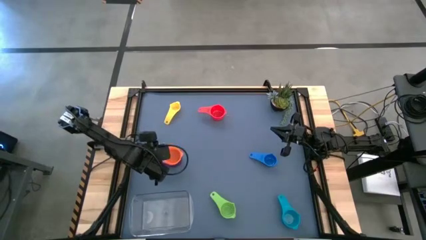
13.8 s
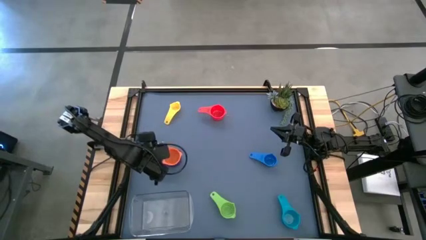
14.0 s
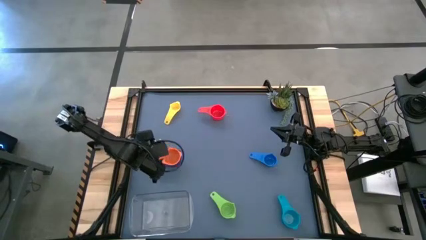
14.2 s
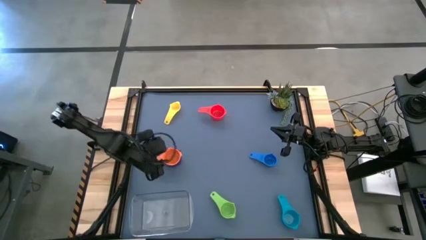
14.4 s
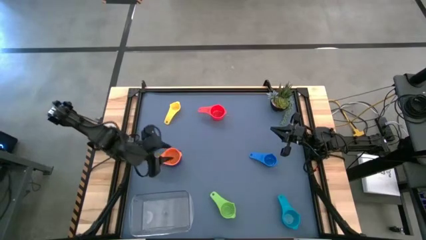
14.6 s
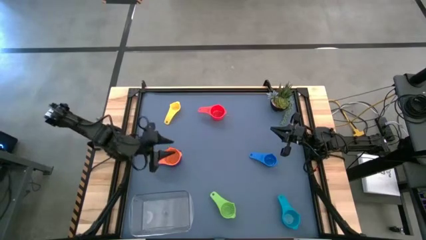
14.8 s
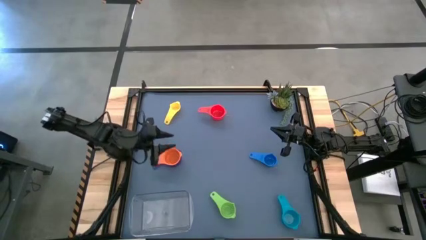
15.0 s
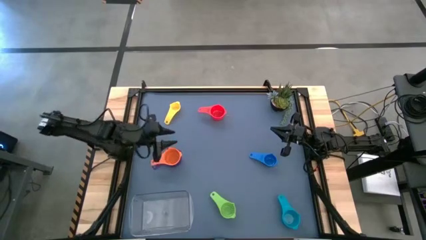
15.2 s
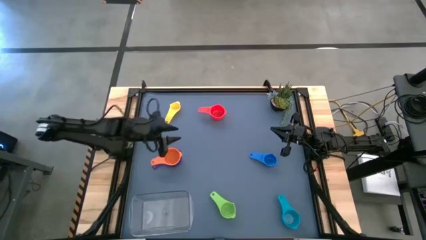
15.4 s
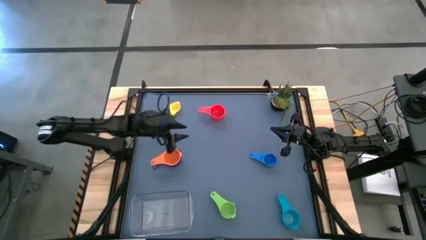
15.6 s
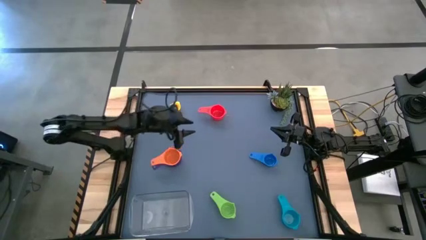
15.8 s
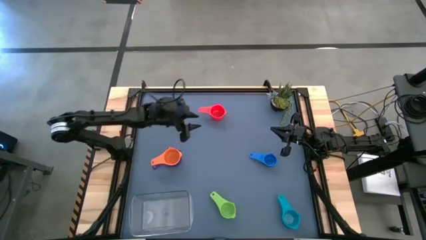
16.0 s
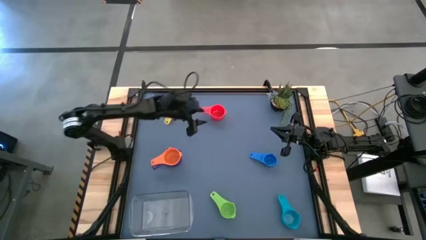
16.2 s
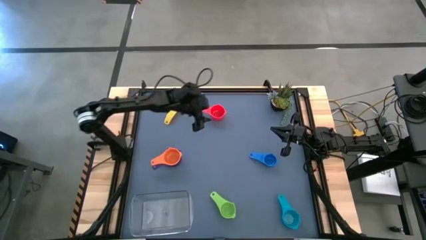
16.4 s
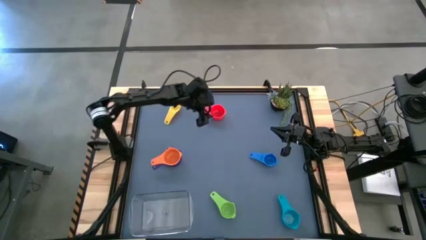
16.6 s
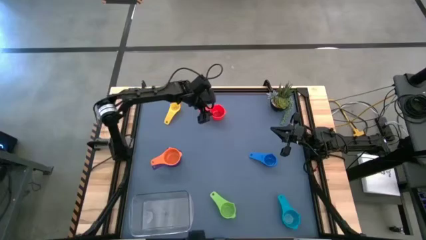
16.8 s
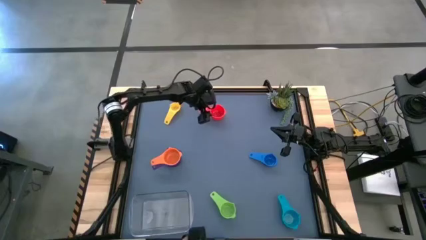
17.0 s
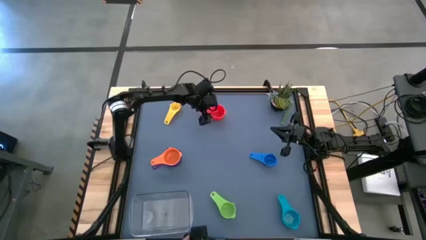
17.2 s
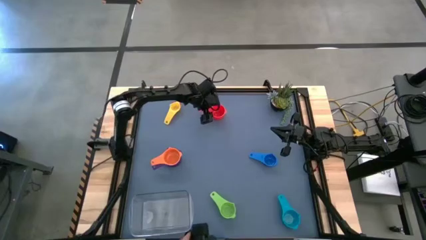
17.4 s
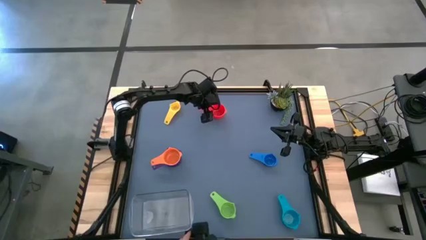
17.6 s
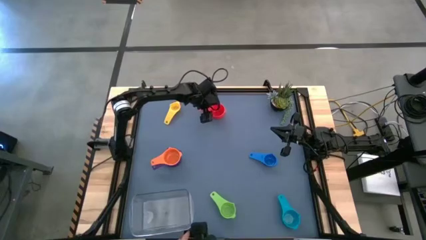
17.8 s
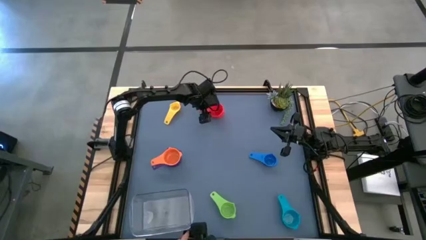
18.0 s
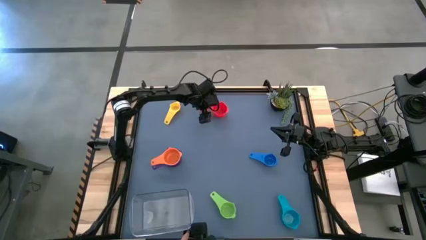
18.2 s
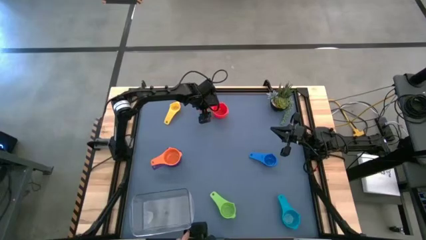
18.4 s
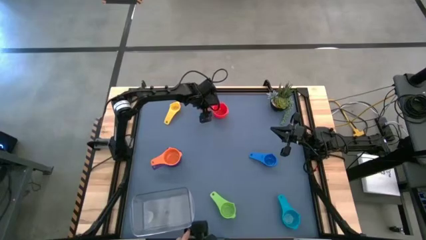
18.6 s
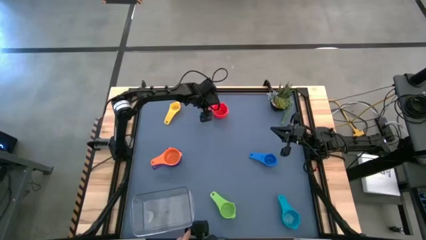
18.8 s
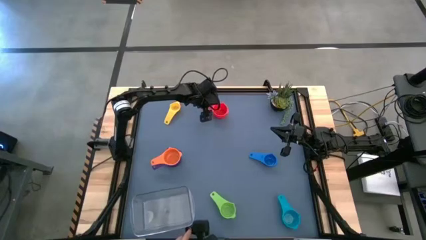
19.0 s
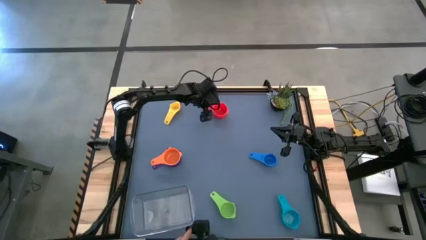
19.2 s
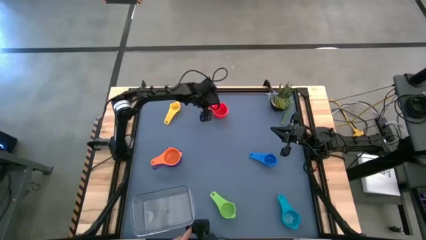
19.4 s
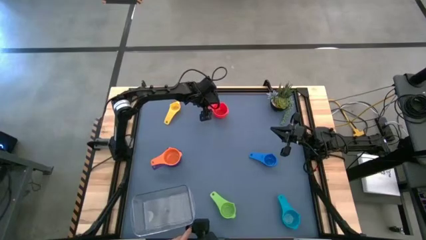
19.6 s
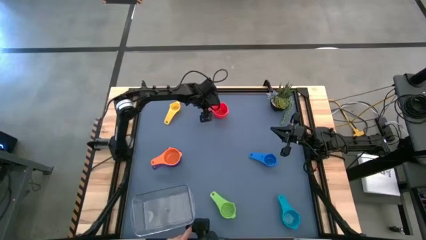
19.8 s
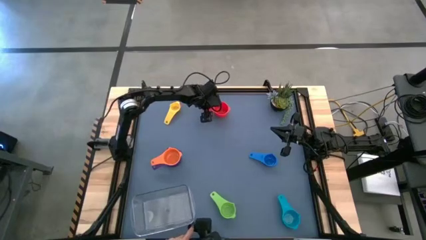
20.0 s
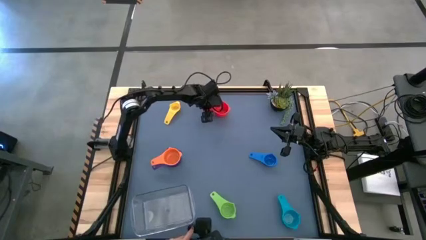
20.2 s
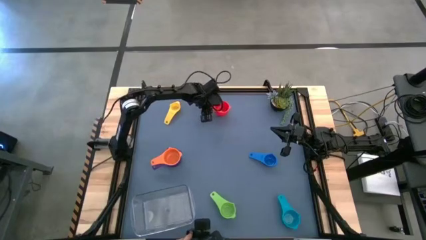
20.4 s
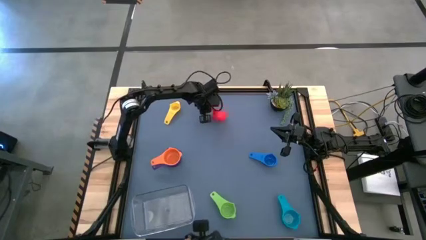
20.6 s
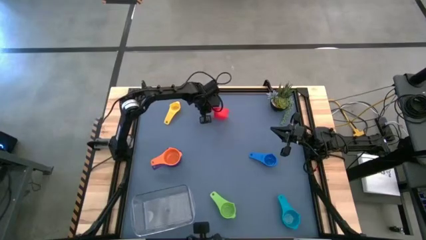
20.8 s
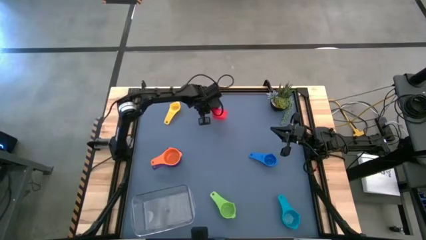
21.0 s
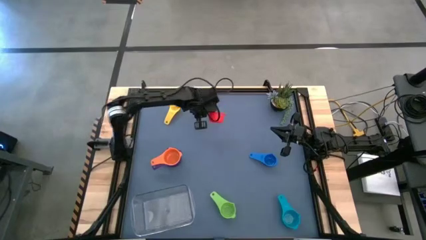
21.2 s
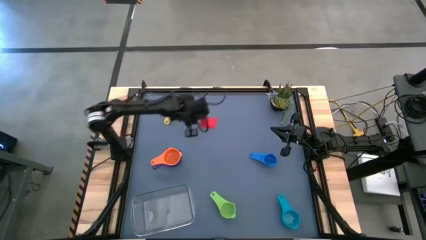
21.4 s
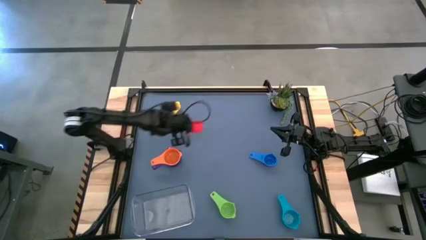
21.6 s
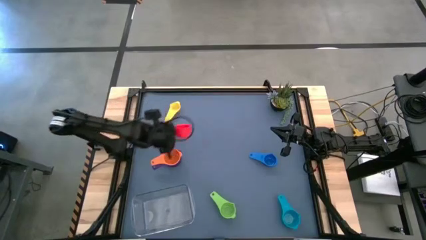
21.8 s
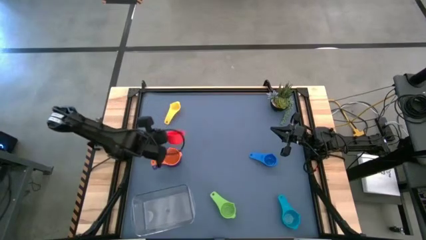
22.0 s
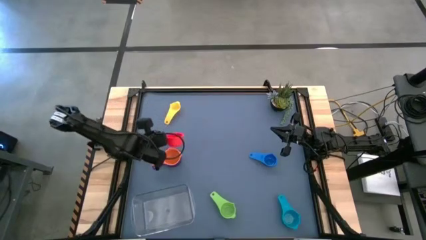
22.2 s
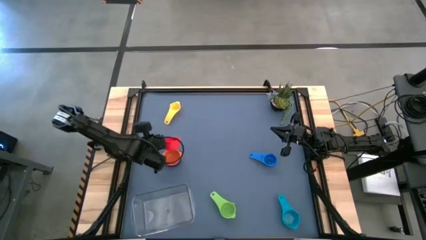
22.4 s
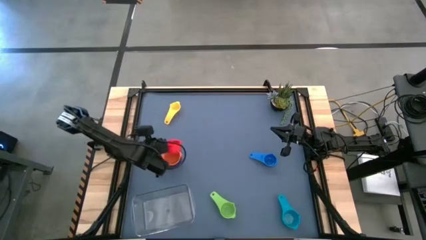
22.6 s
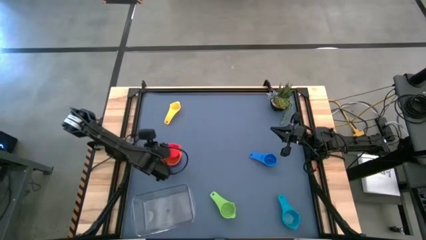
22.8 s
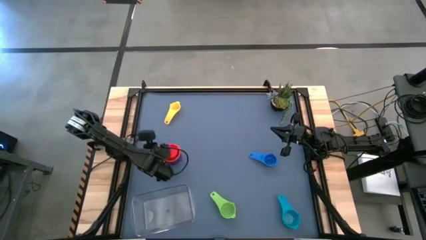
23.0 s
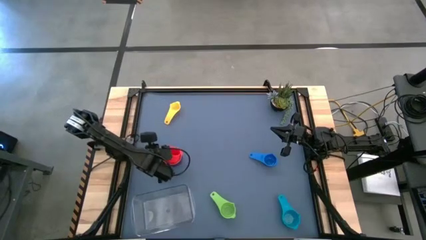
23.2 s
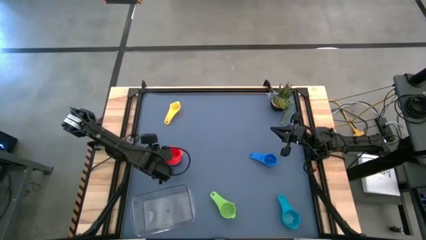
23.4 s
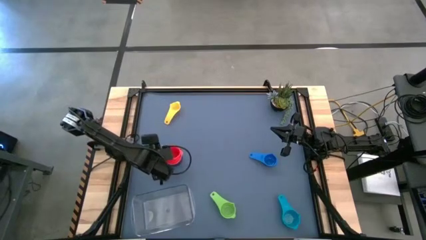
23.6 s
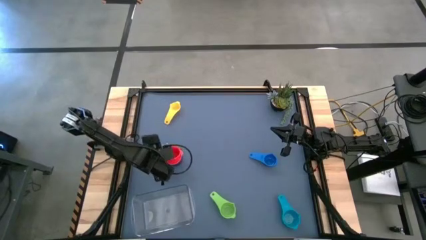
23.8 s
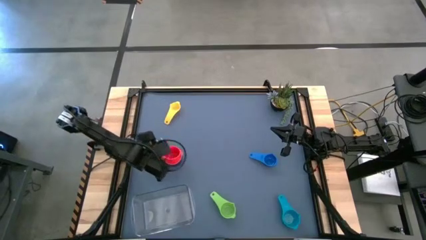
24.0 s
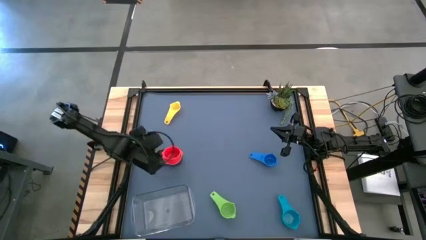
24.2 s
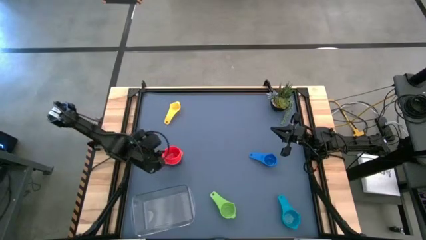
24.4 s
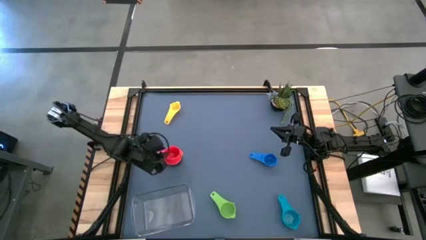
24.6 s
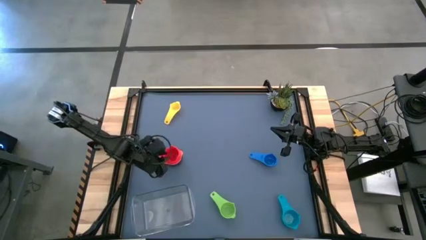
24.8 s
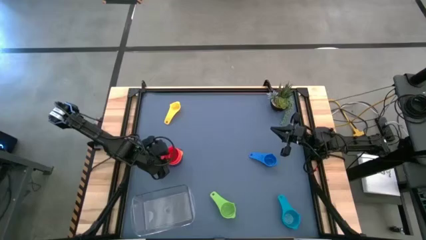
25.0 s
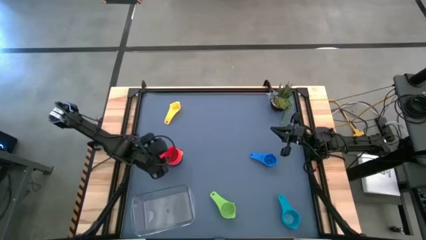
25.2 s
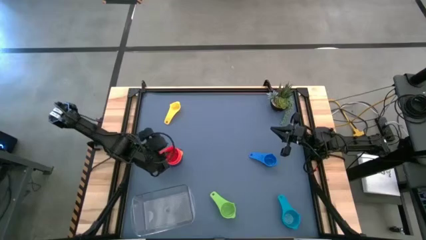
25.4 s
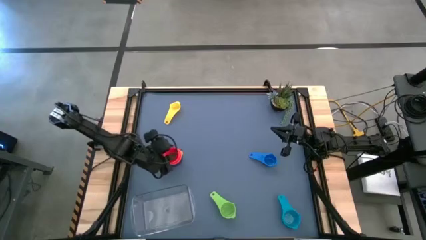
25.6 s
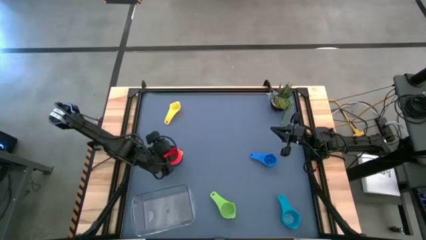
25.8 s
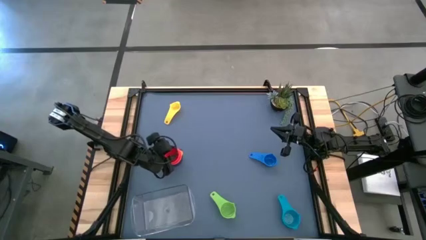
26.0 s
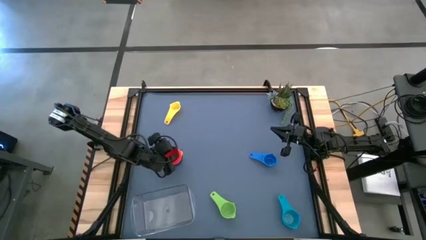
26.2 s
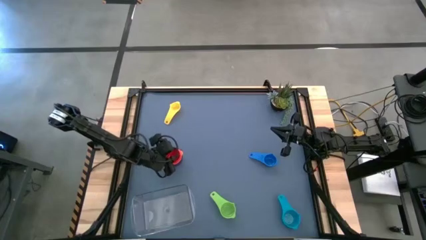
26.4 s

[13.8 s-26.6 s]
Task: Nest measuring cups in basket
Stack the red measuring cup on top of the orange measuring cup
